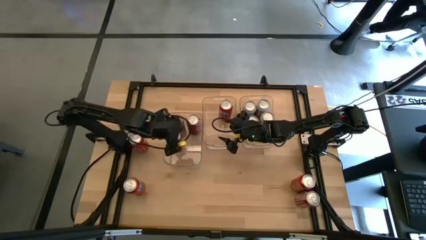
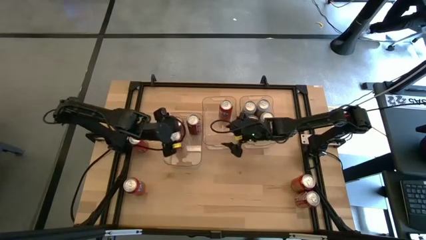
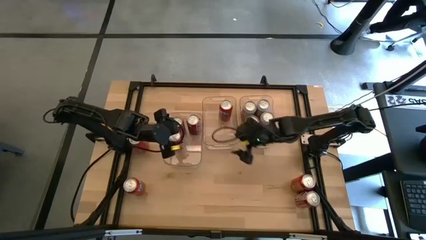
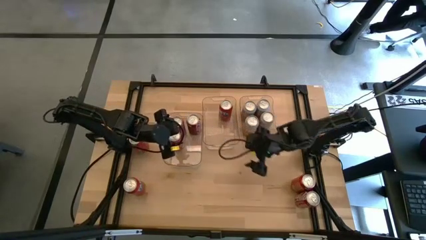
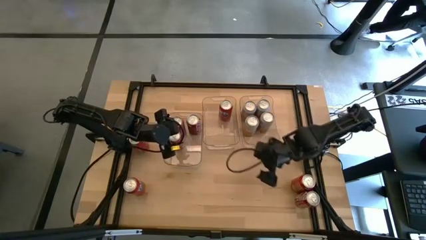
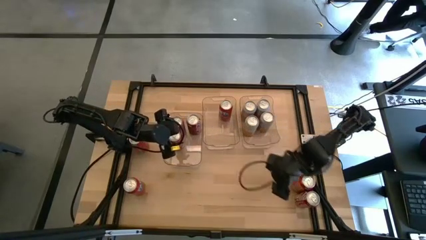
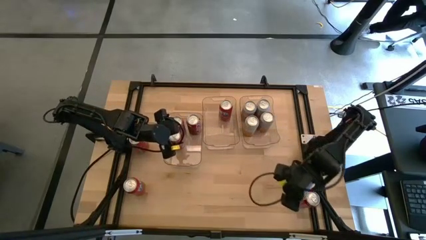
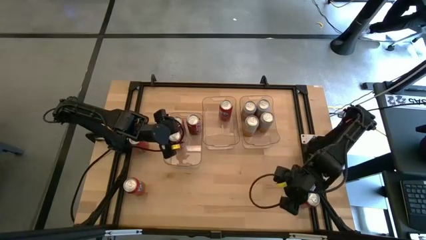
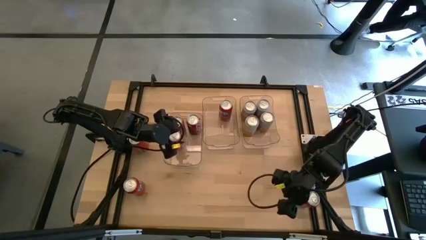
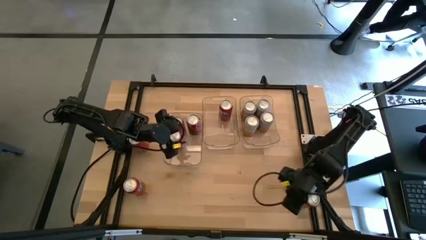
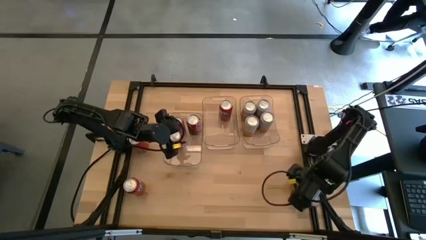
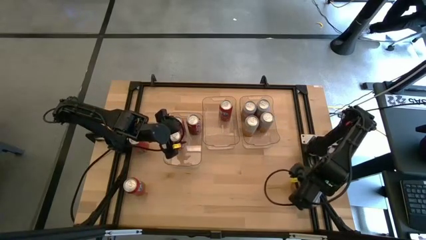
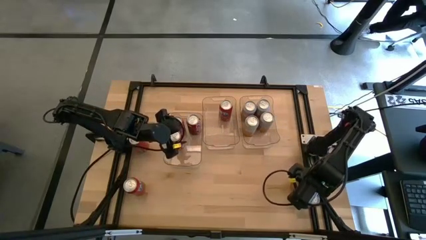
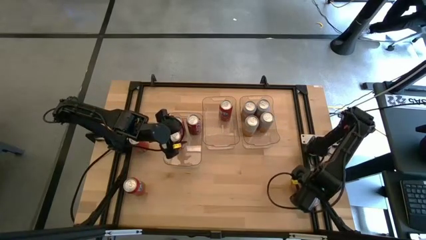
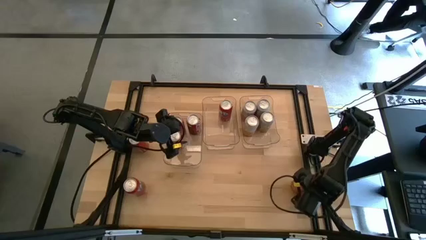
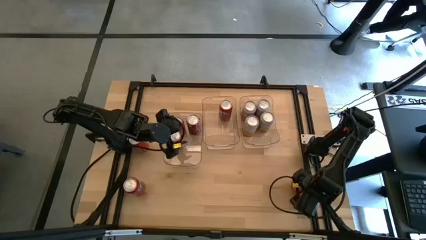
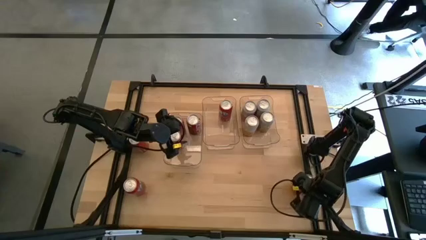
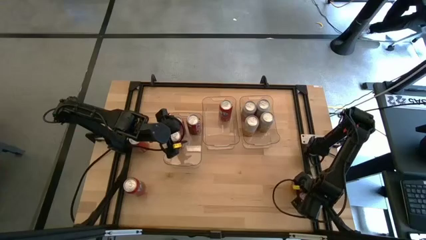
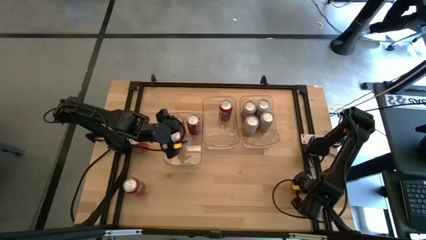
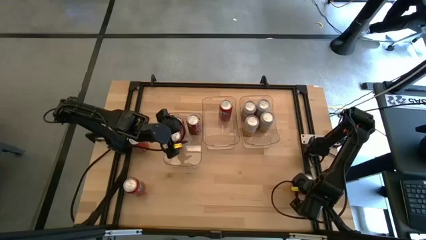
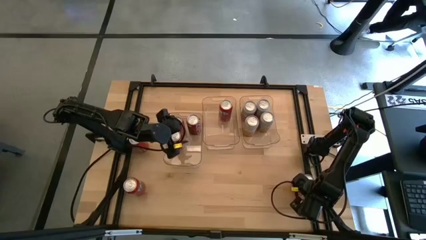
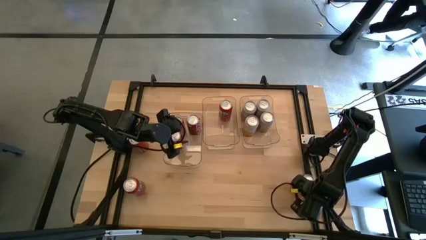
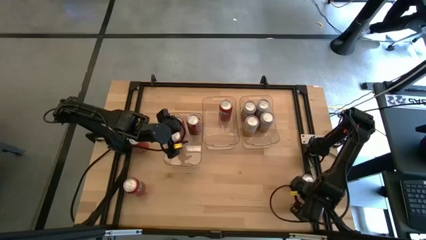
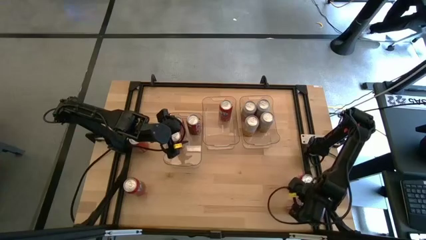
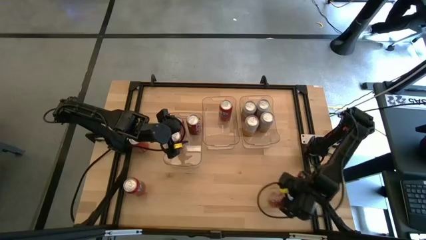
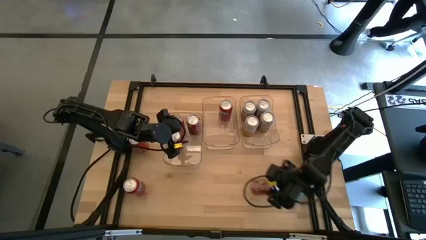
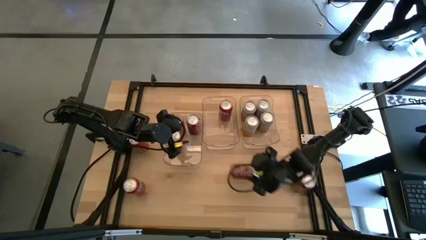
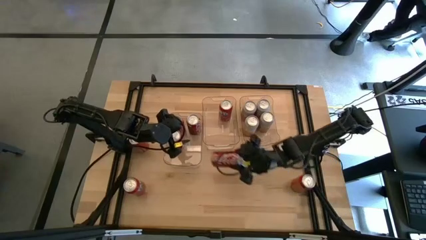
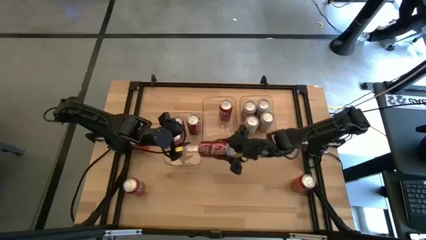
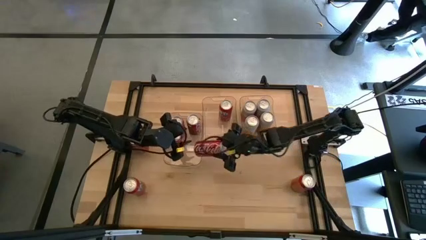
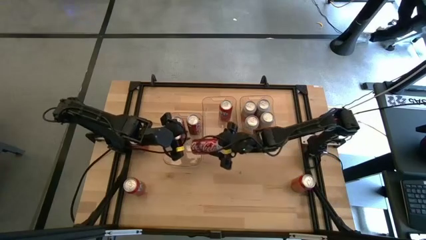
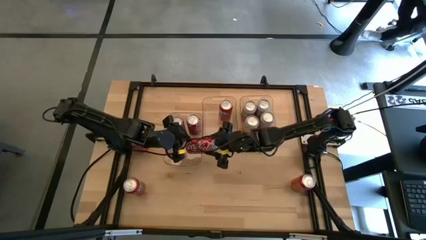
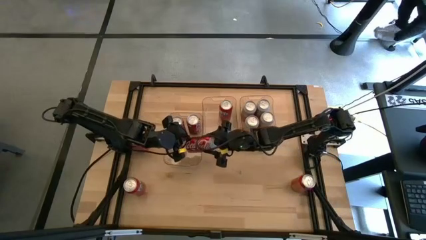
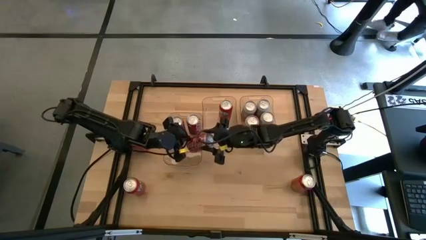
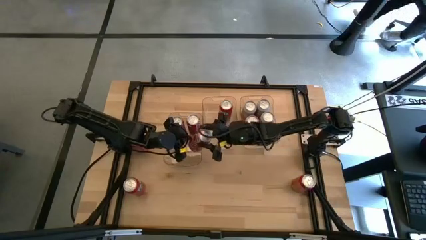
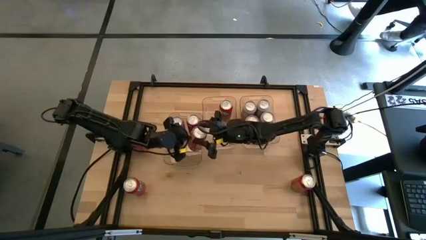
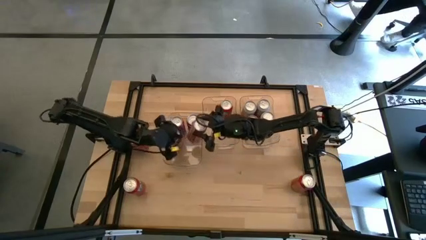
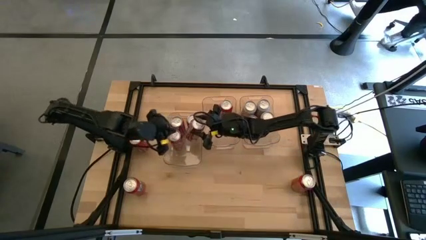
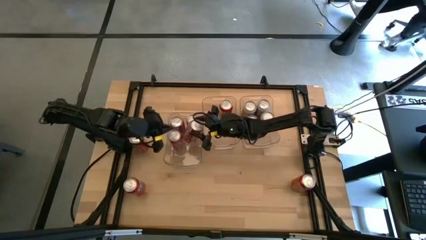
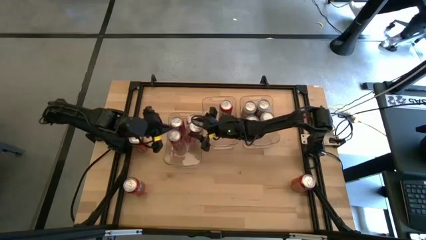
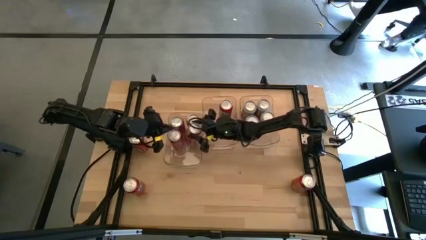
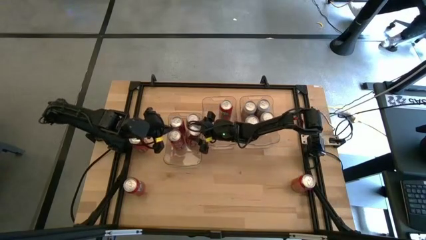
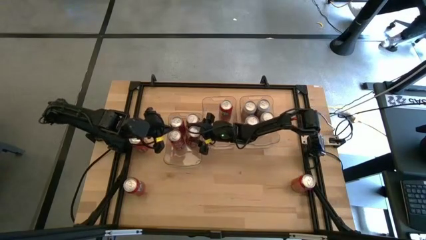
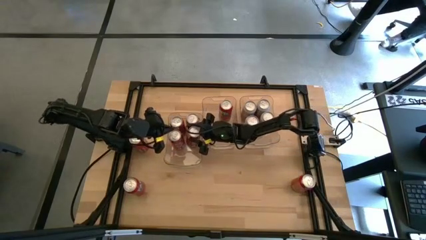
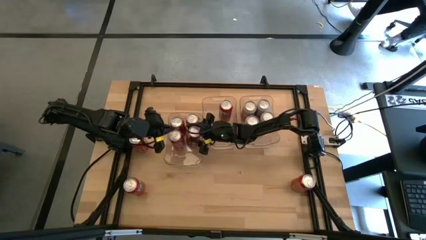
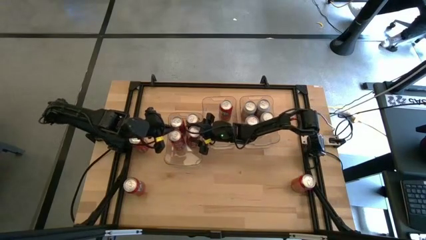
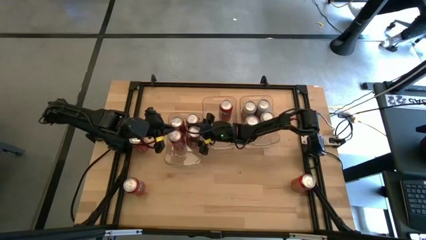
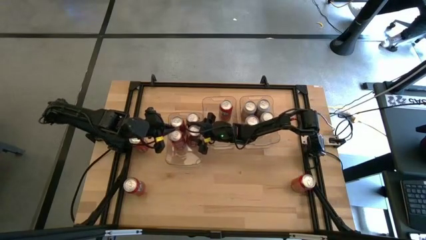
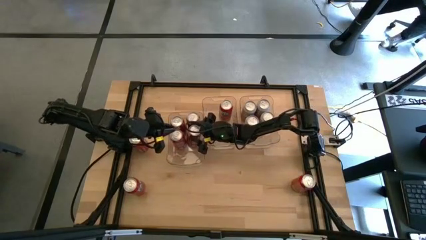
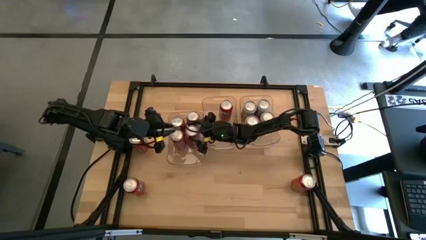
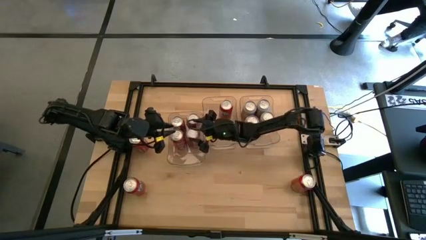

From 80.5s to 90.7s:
Task: Sort soda cans
Put the red soda can into the middle left transparent bin

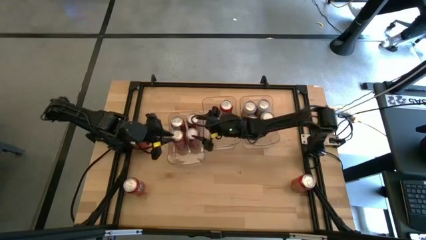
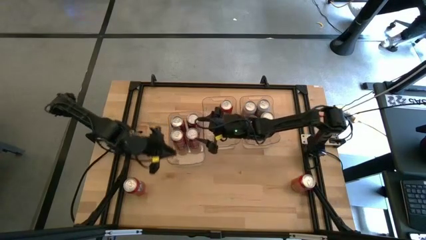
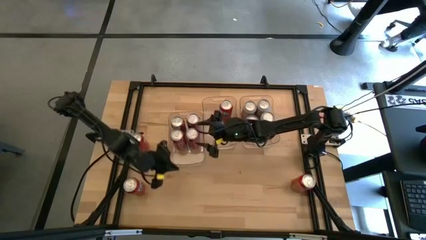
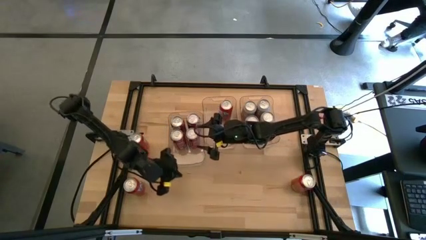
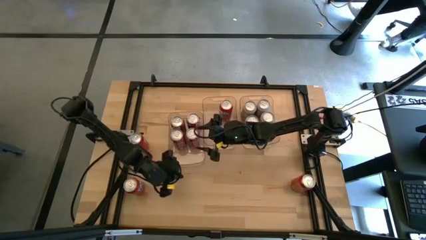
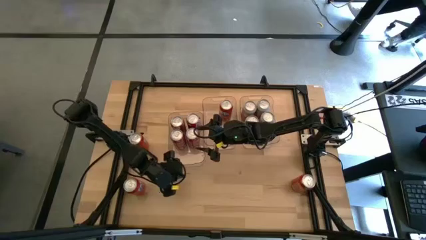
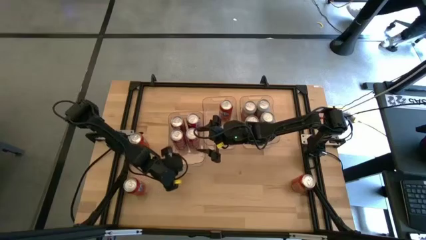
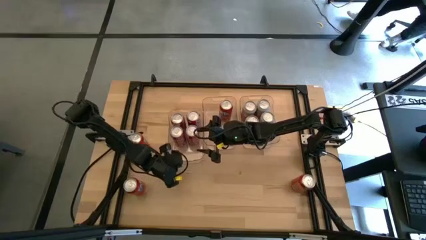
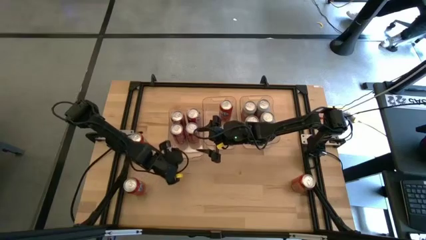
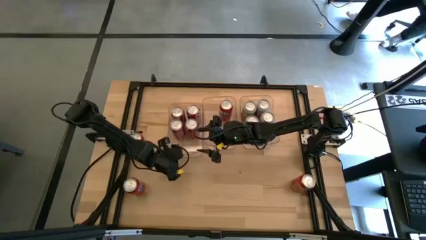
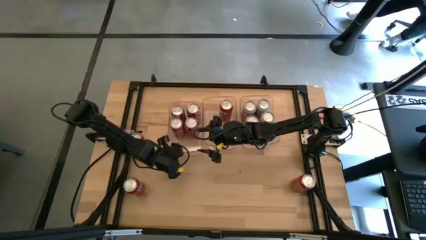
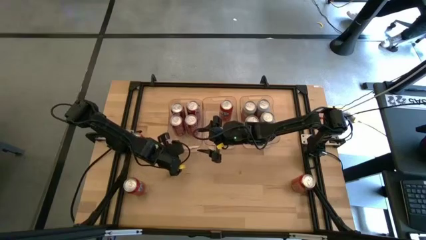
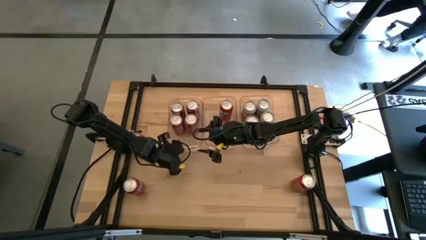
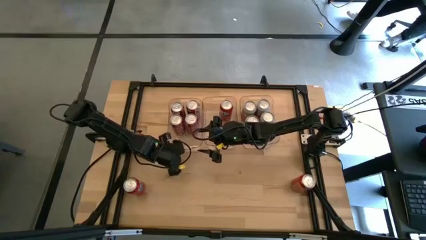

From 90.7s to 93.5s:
Adjust the middle left transparent bin

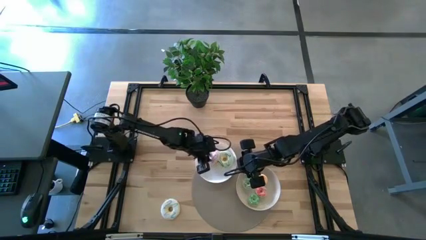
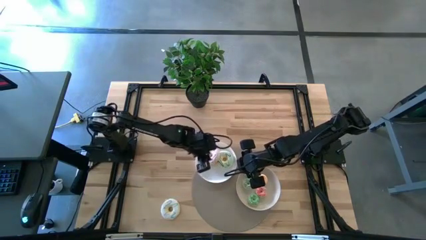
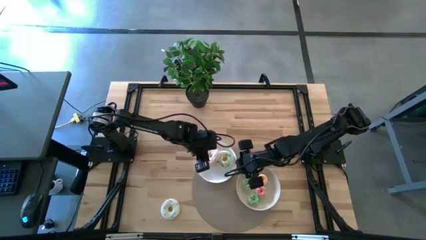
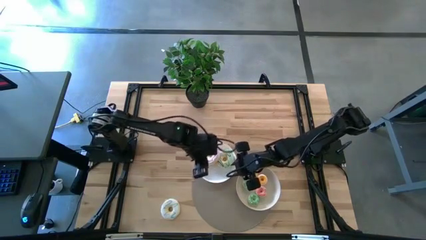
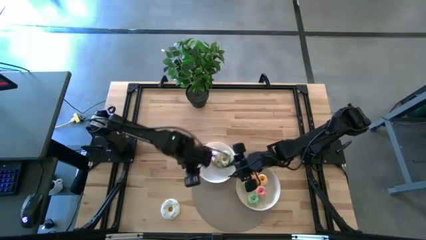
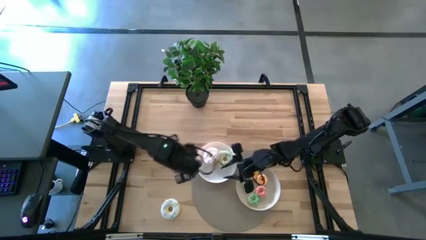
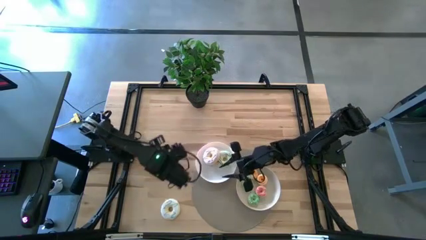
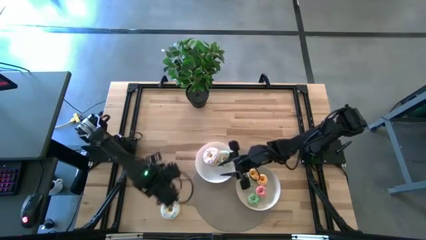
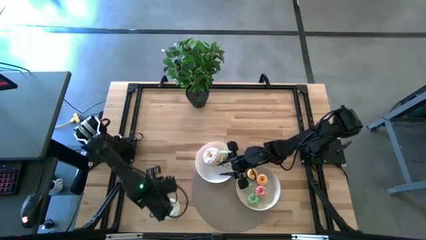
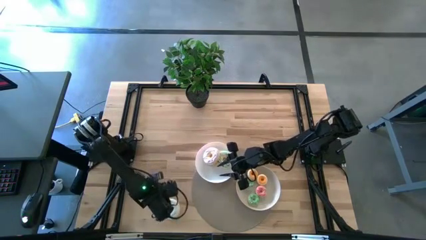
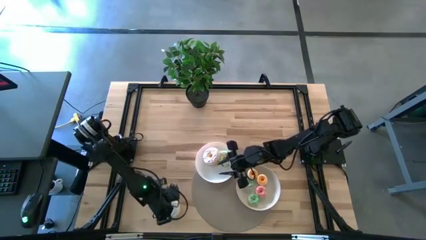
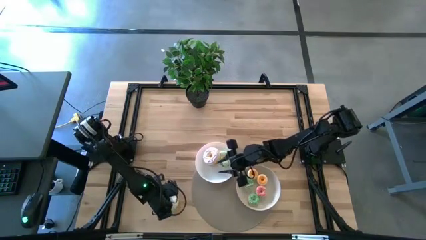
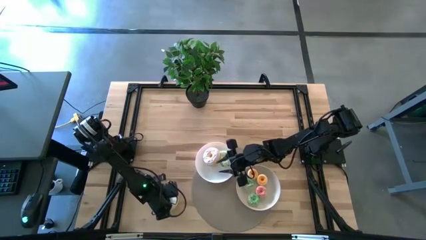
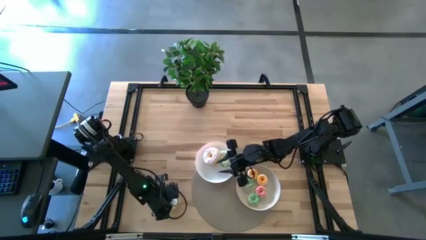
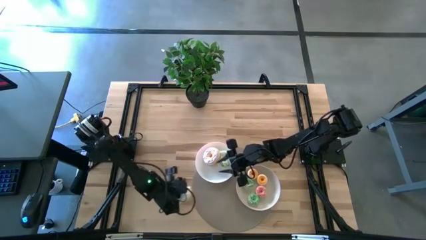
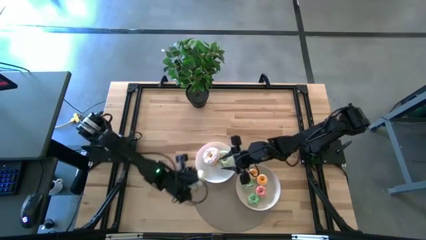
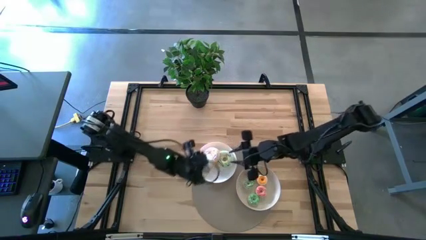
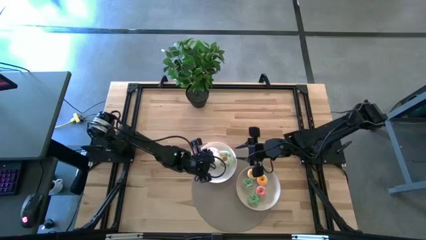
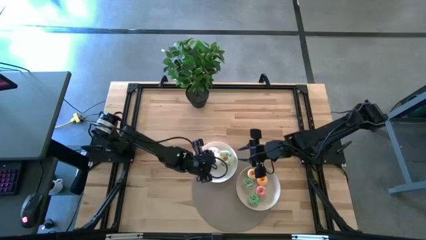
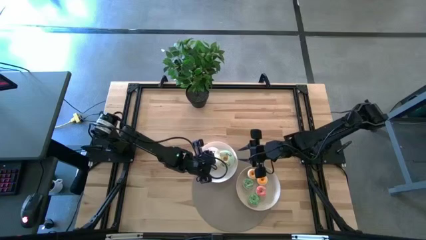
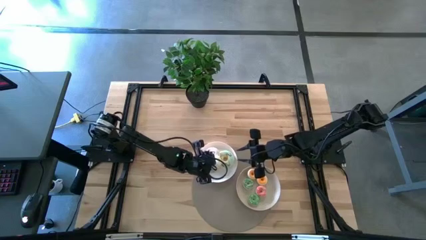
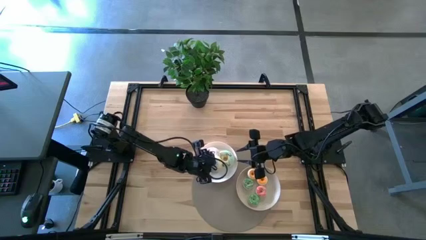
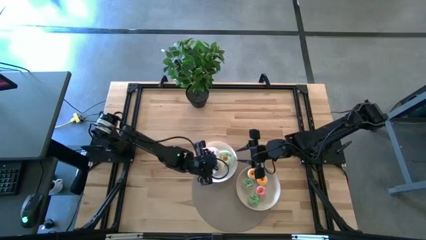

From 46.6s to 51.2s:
Task: Pick & Place donuts
Put the big white doughnut on the white plate
